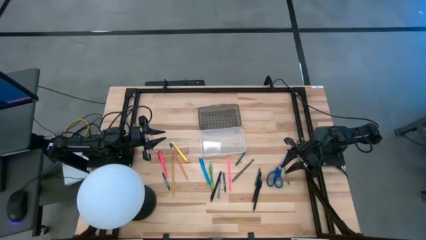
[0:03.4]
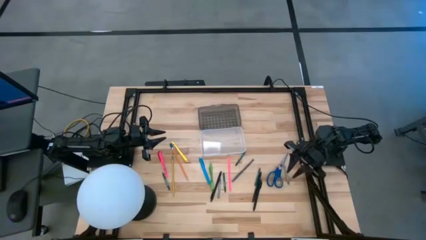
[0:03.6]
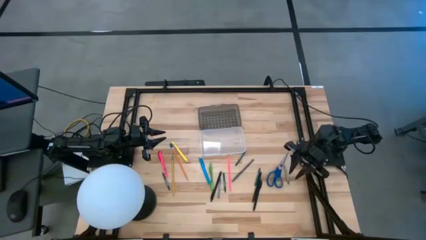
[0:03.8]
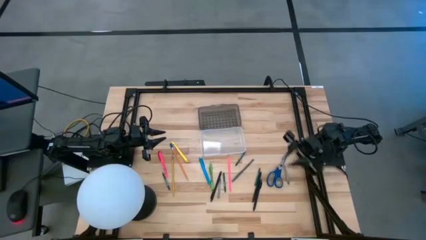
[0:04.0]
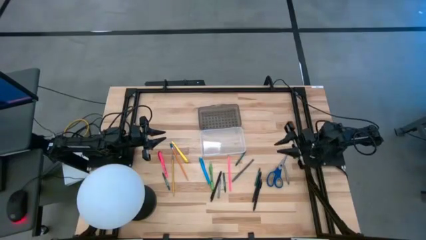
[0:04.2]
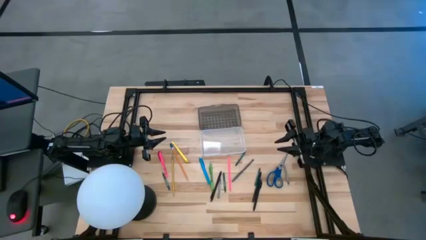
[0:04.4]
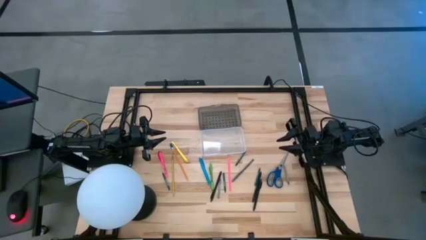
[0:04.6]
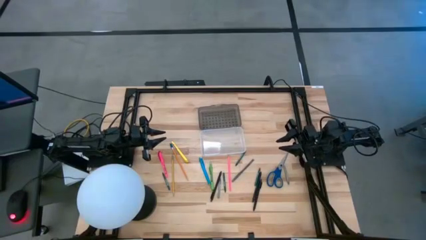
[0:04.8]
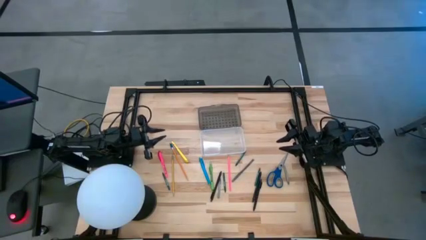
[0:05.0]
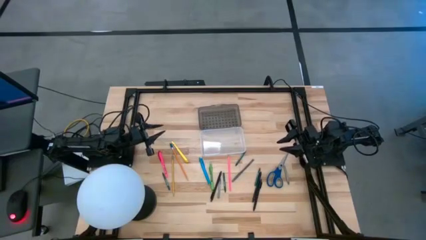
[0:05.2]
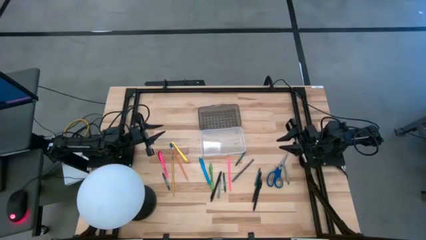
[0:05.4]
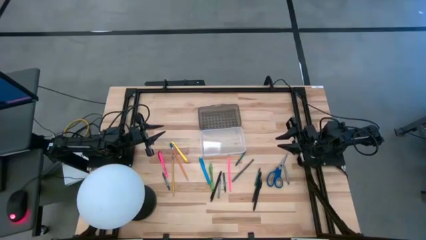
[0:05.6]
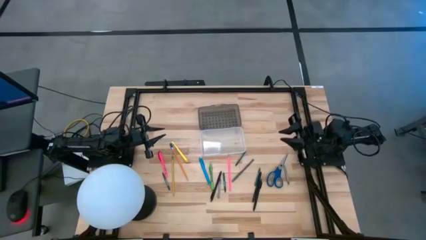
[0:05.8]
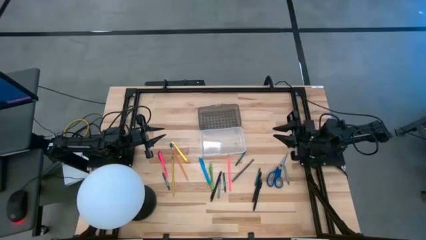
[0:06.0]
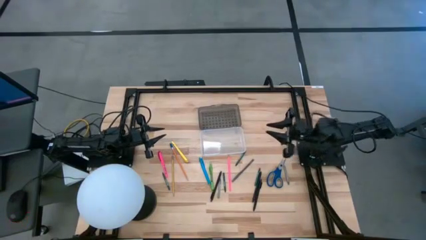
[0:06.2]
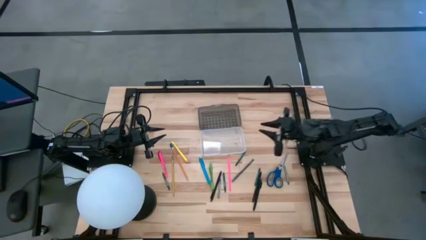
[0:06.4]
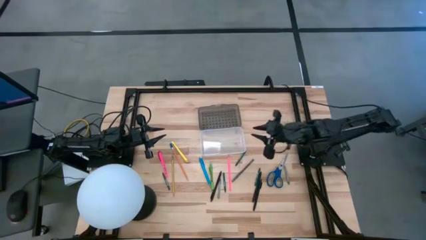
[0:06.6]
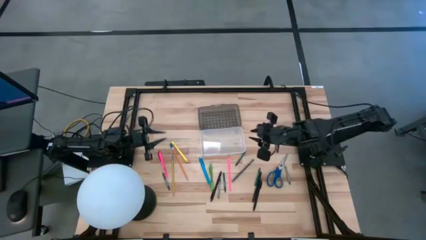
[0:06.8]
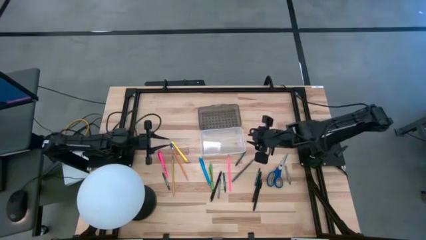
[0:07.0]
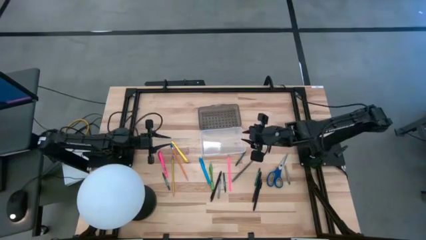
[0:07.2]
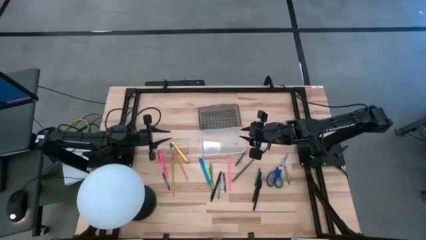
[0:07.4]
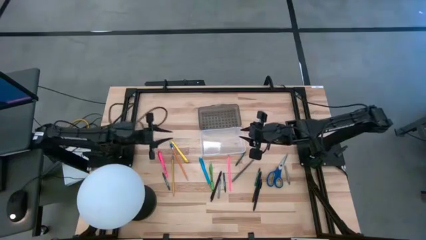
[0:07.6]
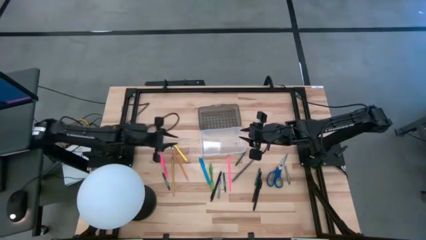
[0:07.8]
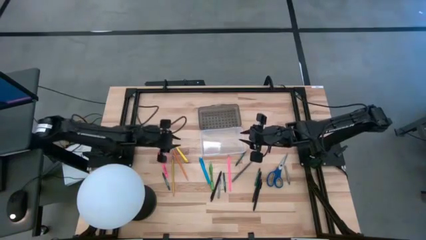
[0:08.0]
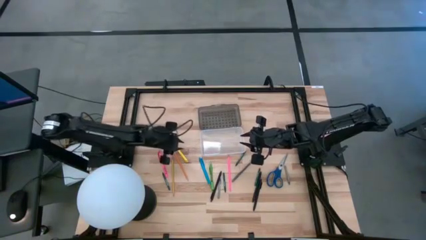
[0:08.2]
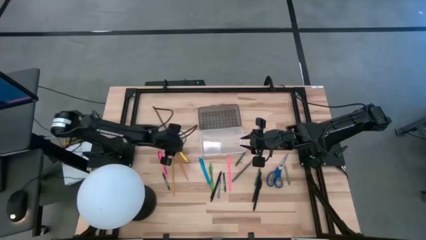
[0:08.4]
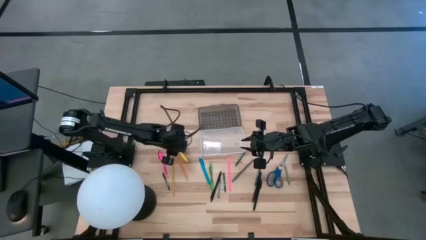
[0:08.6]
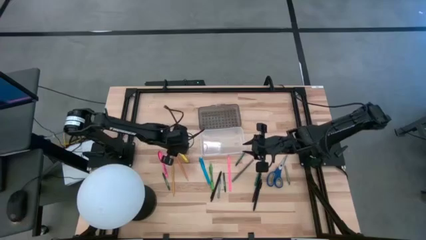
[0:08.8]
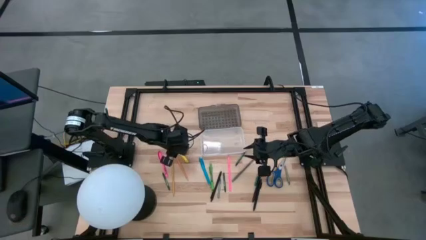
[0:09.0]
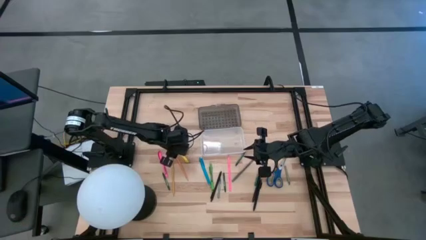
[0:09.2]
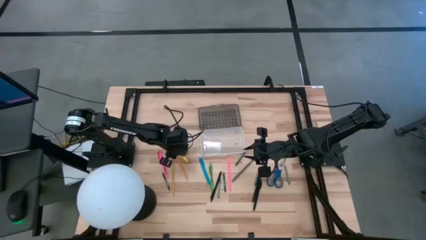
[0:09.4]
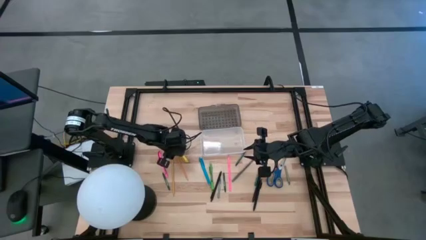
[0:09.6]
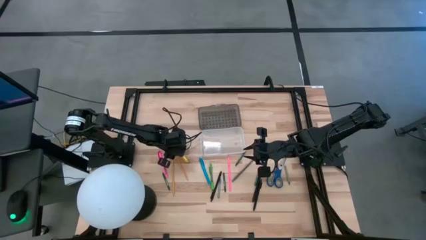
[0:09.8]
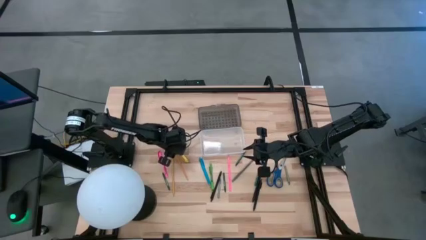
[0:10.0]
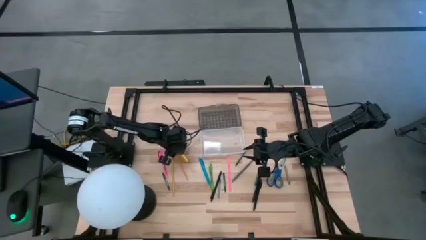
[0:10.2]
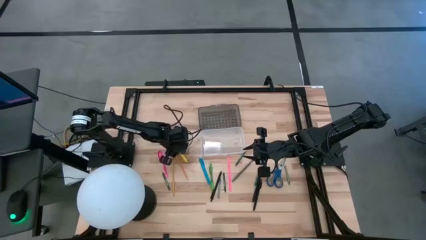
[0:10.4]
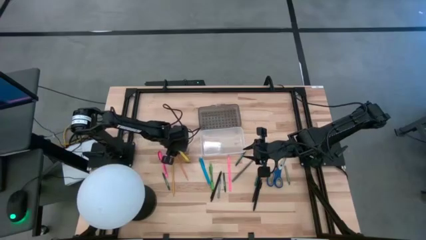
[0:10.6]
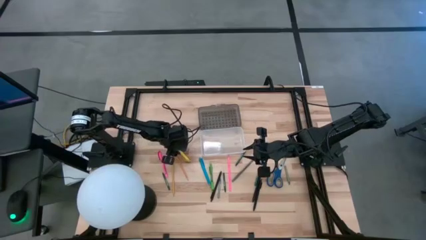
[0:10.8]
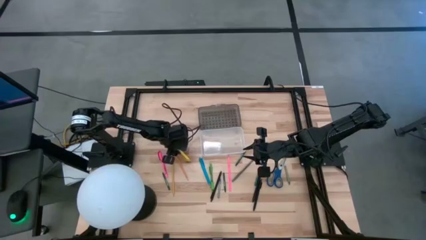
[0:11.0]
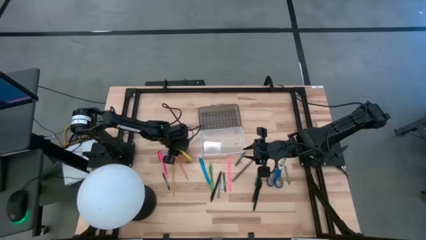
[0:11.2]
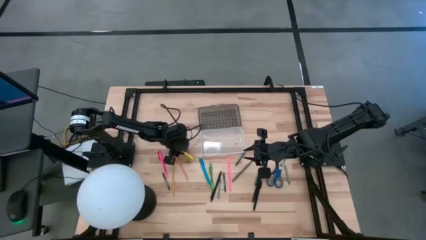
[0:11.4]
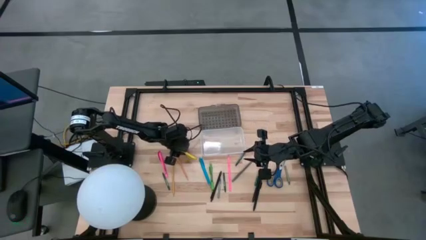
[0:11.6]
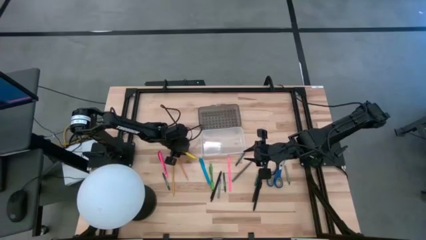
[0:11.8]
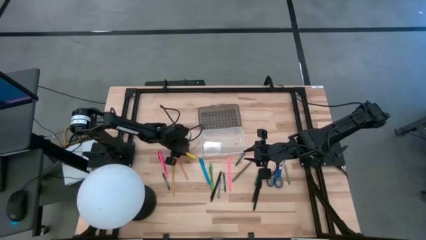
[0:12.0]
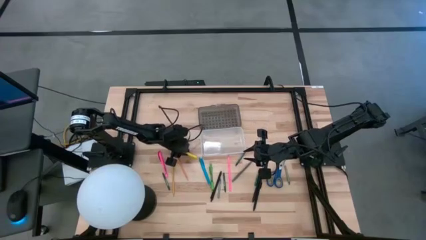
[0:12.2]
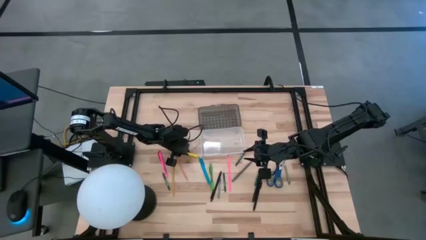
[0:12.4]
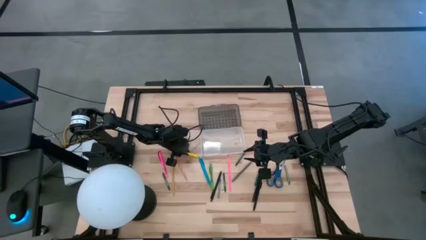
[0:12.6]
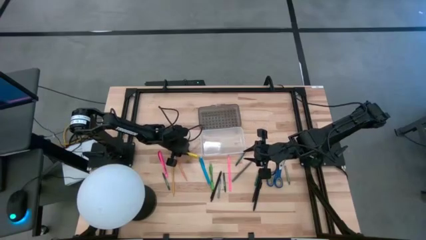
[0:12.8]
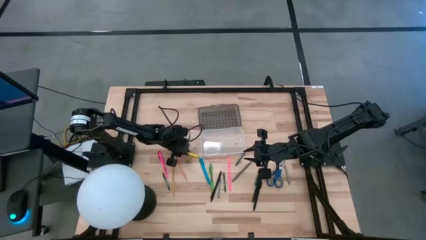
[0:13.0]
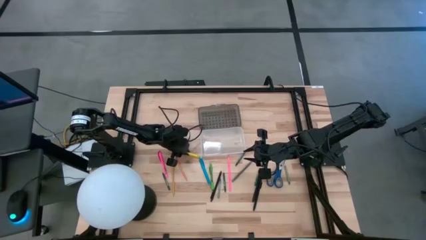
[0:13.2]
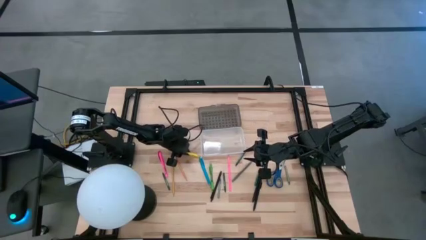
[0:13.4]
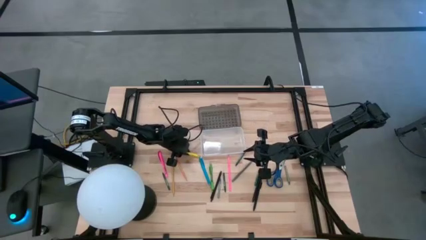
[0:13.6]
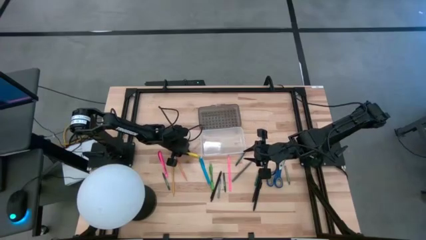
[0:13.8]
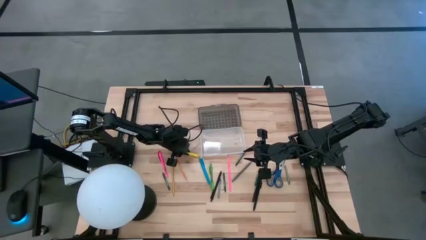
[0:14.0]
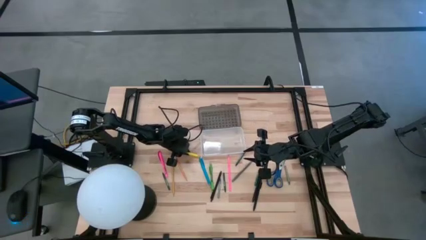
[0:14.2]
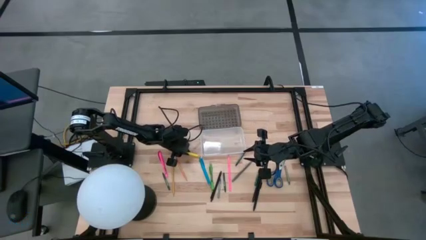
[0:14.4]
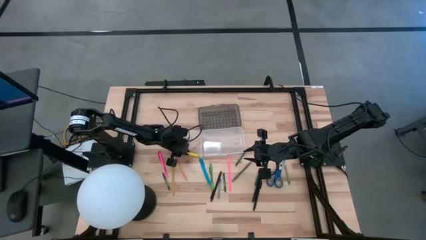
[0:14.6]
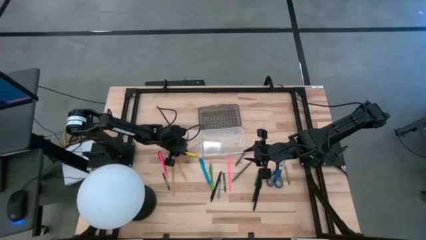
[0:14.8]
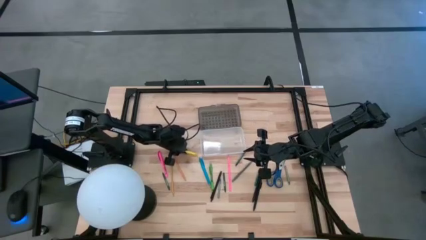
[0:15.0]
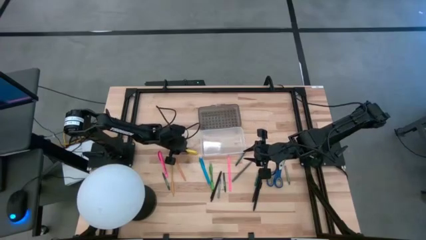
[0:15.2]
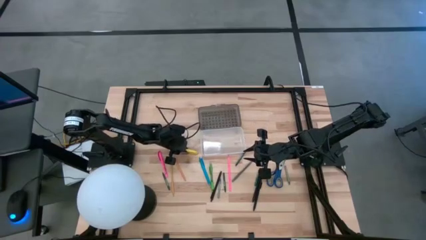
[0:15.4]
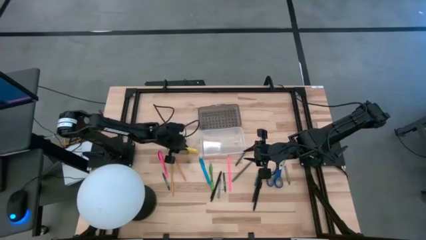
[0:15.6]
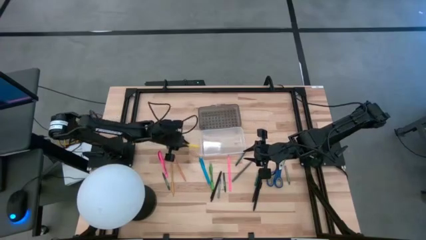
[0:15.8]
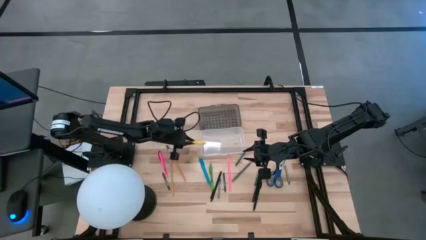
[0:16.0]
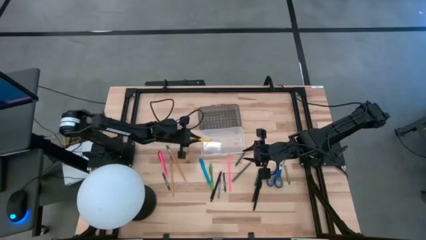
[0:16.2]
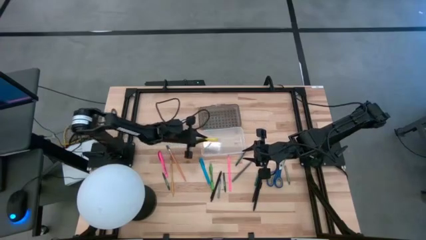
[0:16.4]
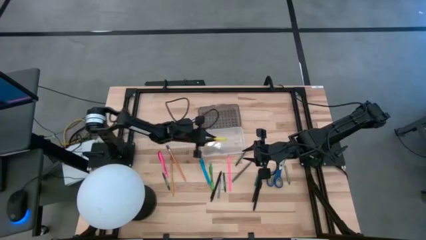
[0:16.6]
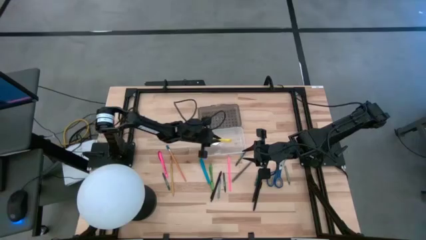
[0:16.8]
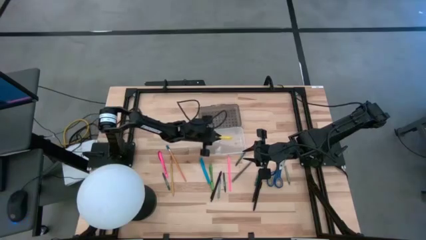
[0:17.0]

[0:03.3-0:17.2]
Task: Pick & place school supplies into a supply box
Put the yellow pen into the supply box
